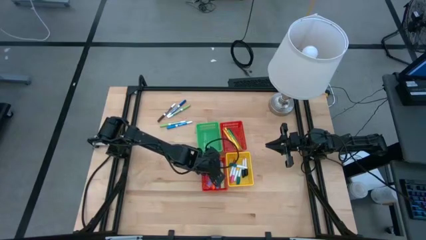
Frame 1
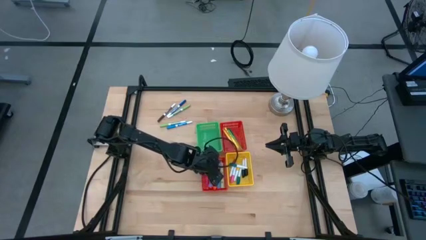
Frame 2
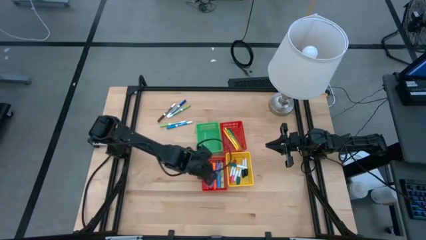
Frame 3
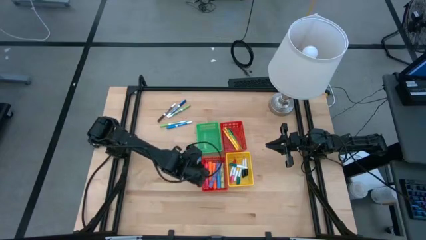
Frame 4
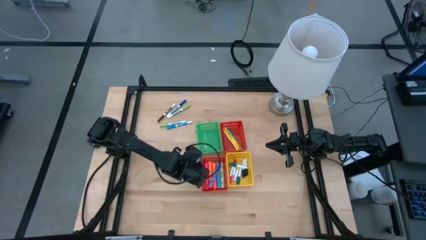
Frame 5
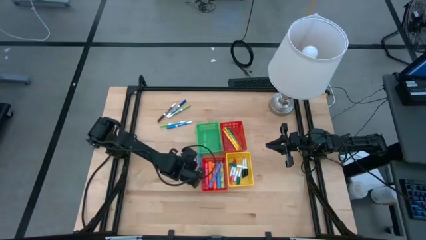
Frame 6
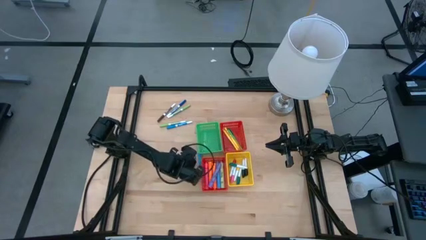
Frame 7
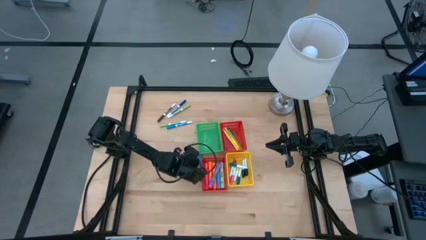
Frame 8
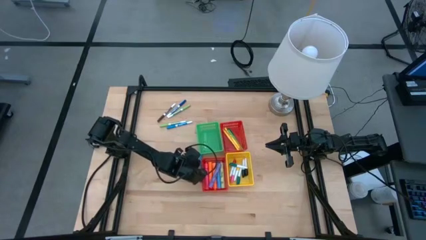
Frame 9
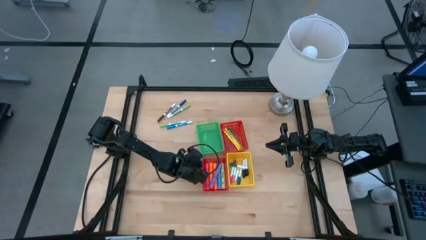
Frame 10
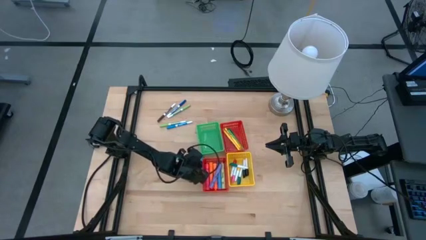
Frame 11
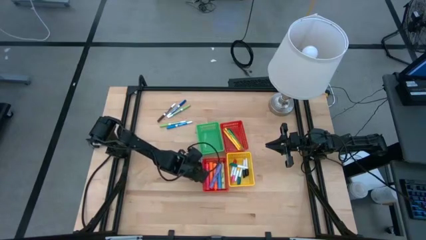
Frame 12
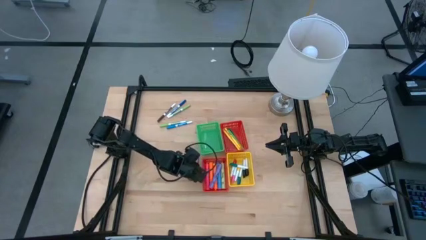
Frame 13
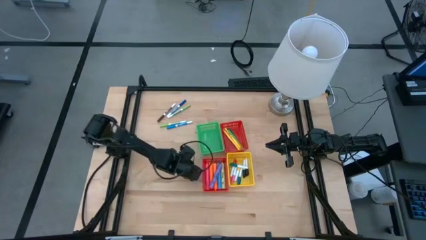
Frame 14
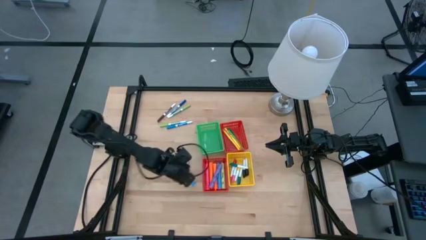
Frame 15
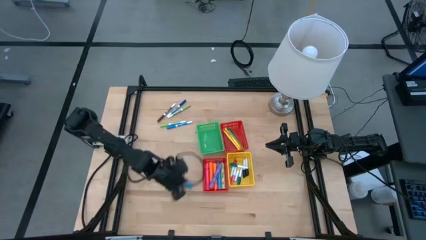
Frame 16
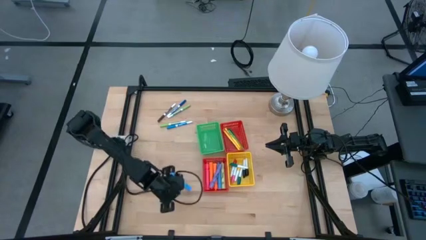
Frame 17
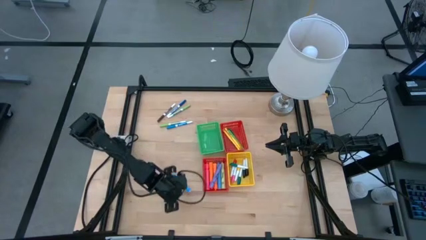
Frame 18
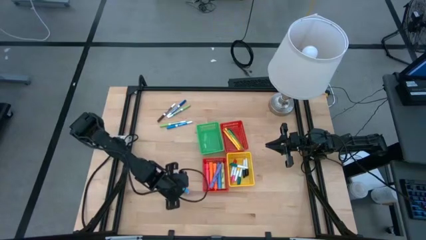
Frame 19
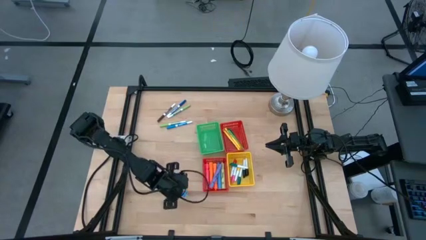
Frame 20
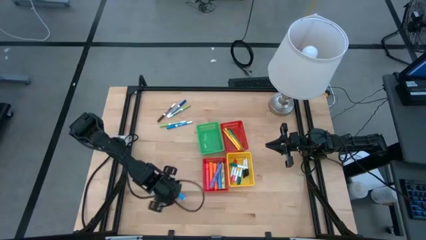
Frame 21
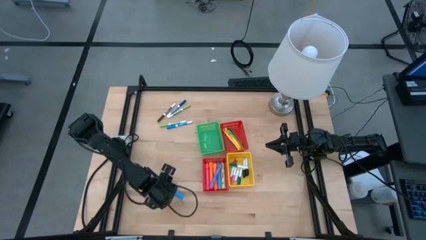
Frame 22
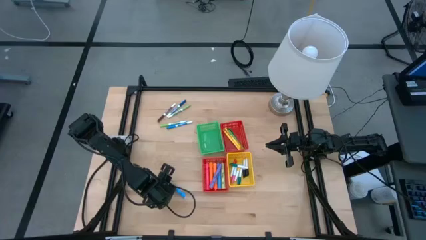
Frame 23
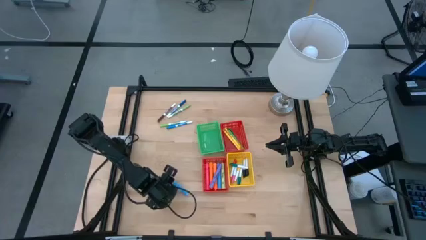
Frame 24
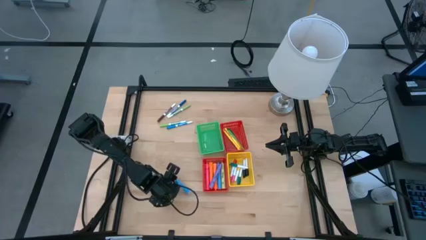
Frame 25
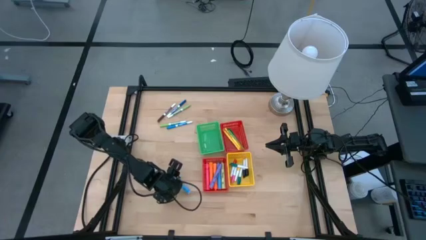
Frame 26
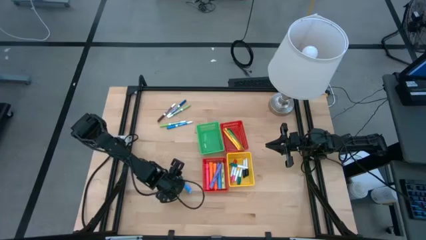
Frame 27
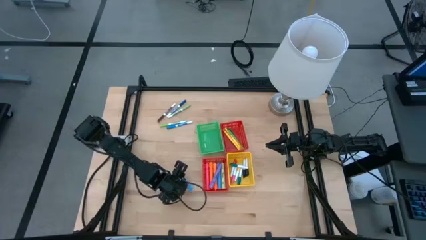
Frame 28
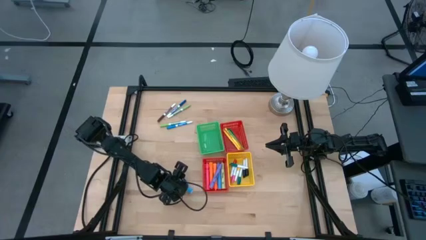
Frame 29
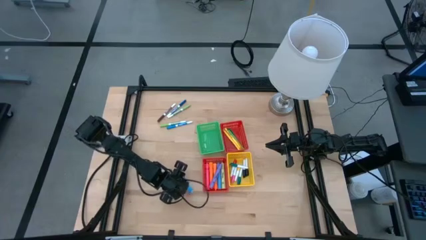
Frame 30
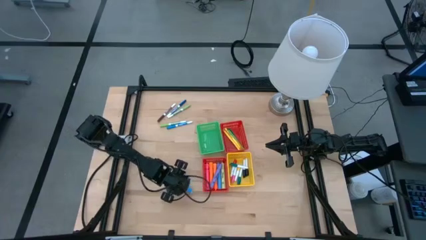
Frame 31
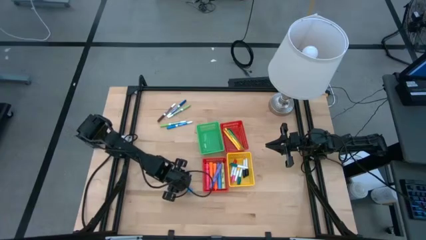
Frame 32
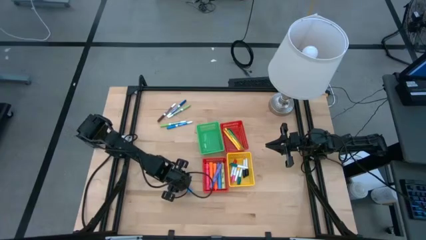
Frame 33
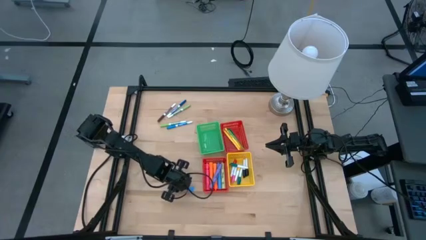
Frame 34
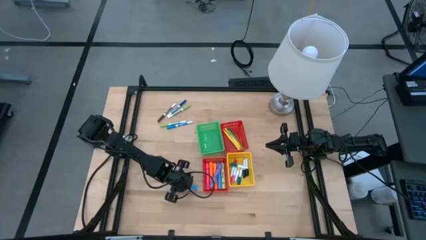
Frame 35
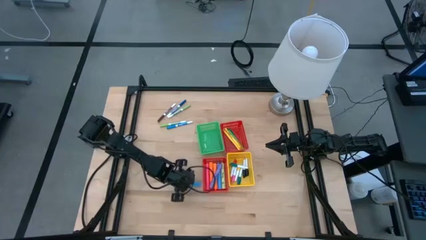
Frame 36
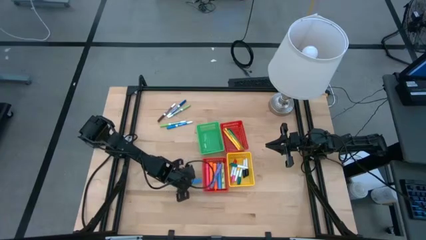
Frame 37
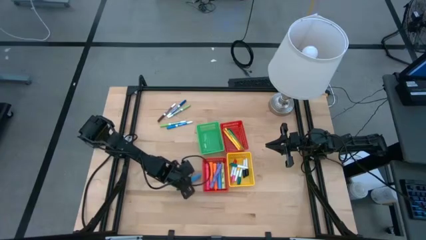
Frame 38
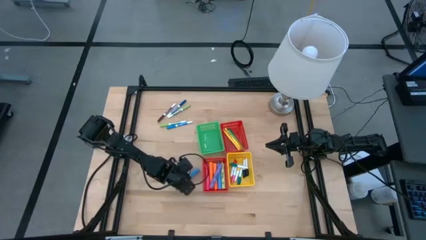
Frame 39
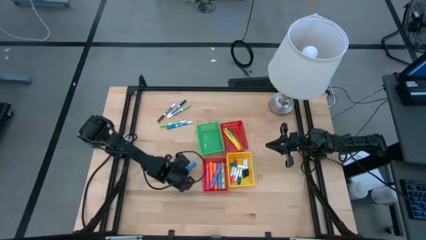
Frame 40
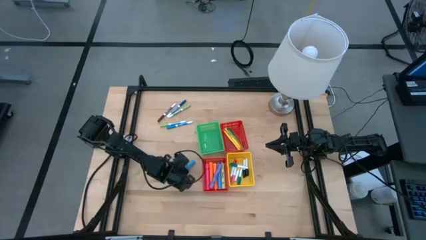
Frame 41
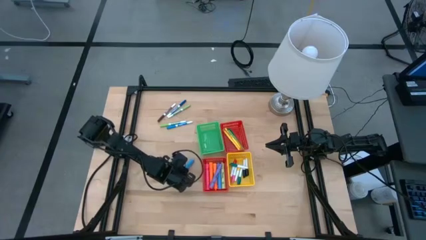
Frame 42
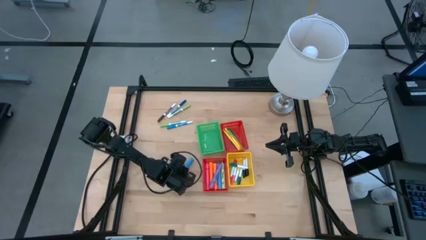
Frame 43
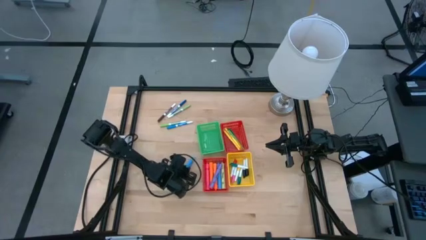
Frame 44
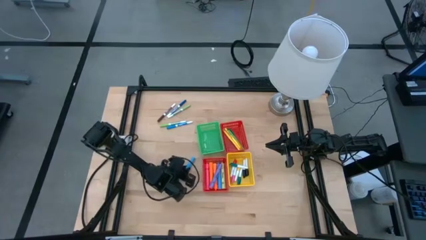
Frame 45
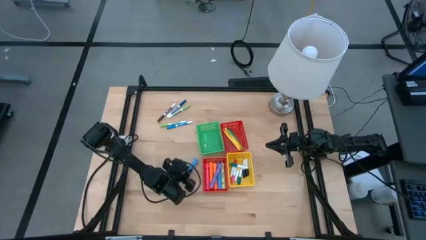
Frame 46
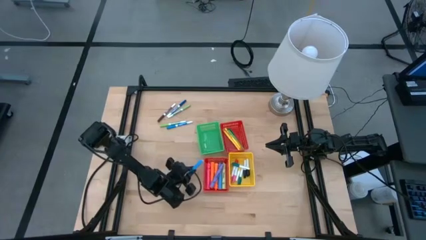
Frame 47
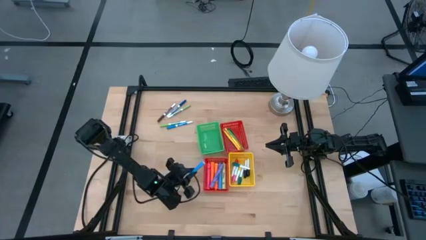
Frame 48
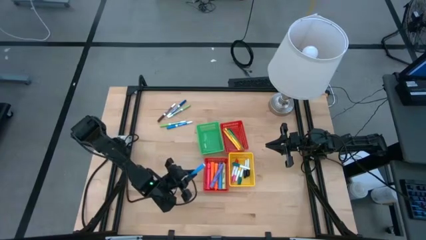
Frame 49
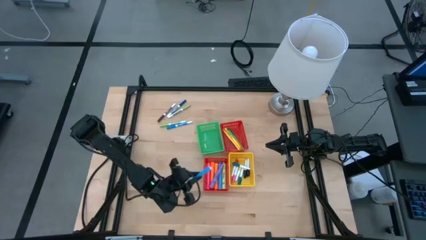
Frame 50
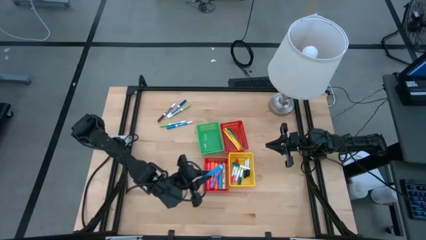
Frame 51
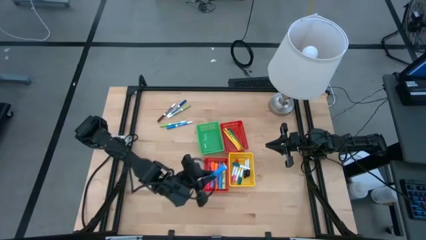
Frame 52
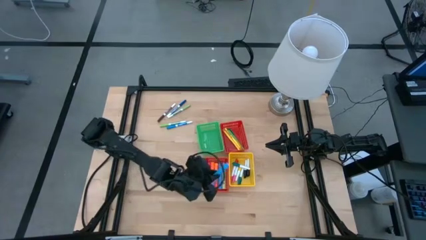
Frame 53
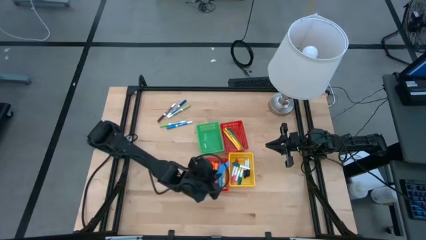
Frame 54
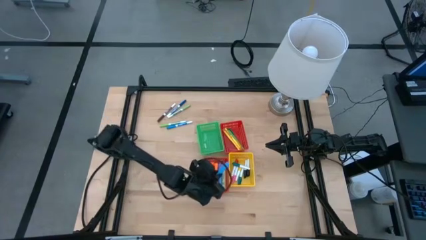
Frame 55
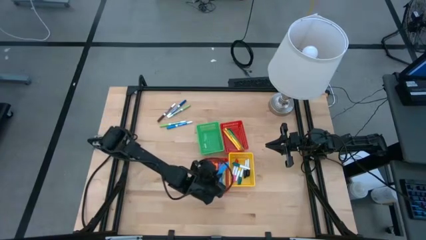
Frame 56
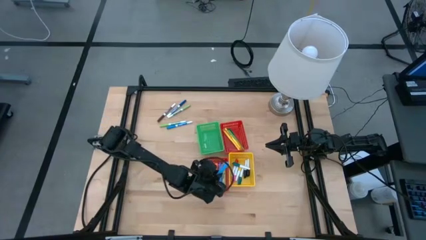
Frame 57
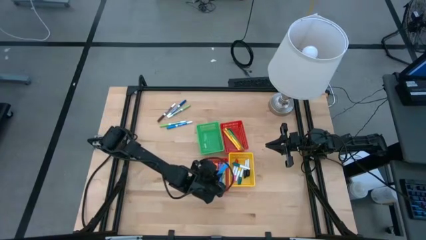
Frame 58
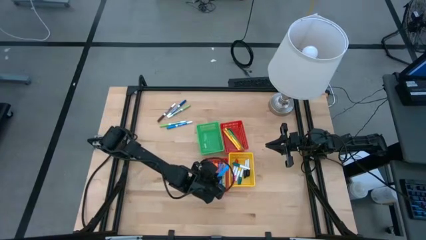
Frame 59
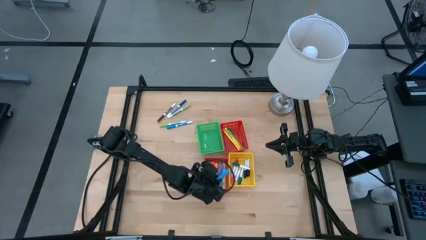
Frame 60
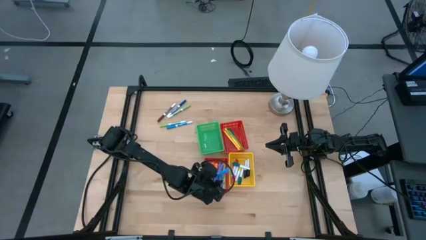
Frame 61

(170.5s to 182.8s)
Task: Pick & Place Markers
Put the large blue highlighter into the bottom red bin
